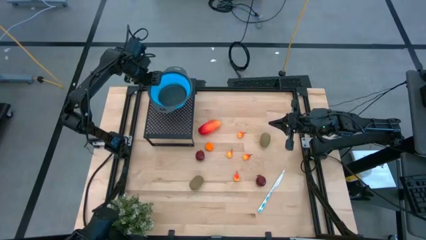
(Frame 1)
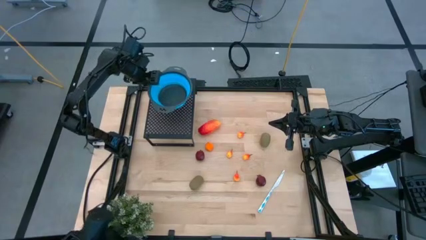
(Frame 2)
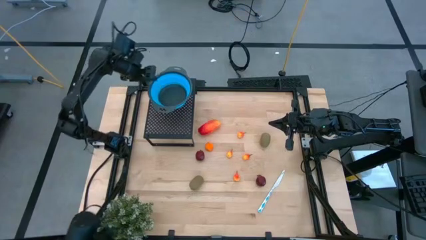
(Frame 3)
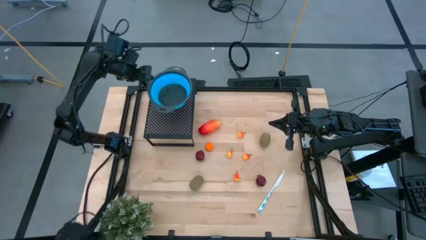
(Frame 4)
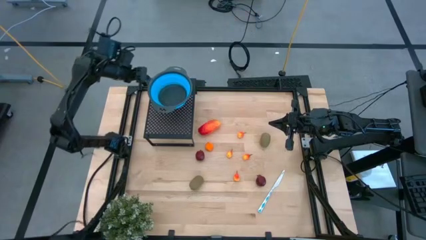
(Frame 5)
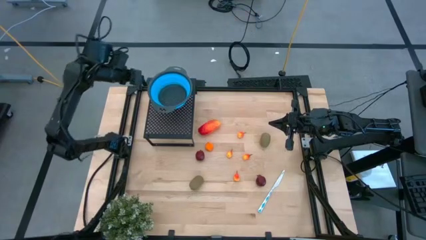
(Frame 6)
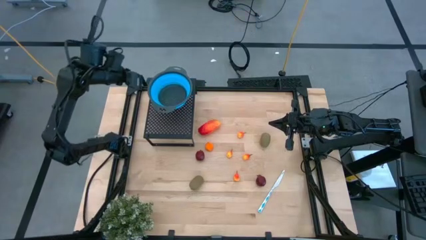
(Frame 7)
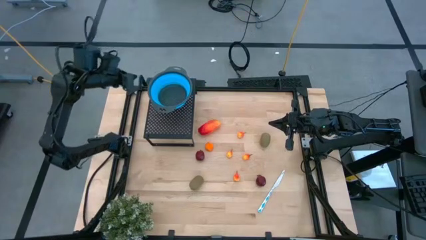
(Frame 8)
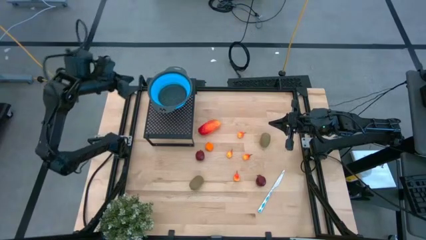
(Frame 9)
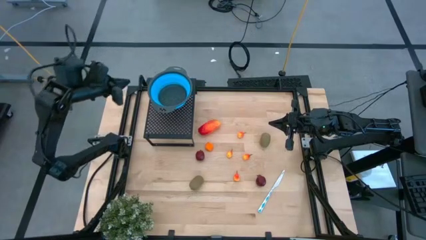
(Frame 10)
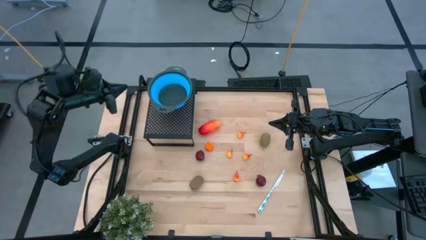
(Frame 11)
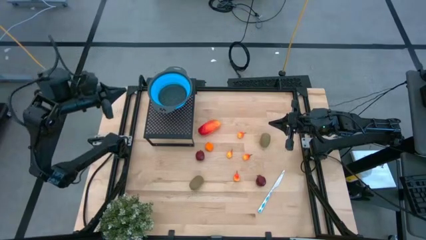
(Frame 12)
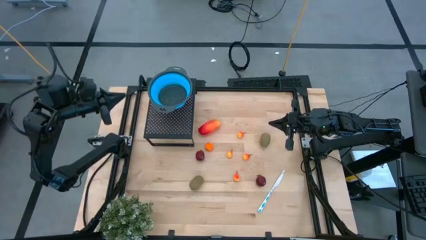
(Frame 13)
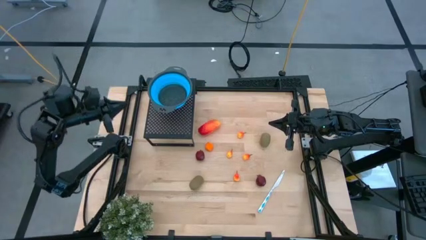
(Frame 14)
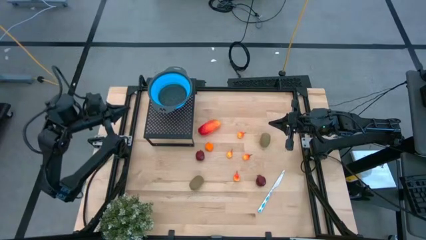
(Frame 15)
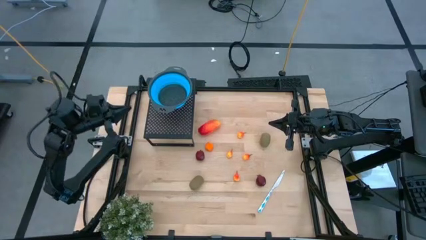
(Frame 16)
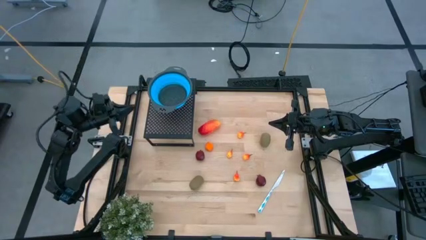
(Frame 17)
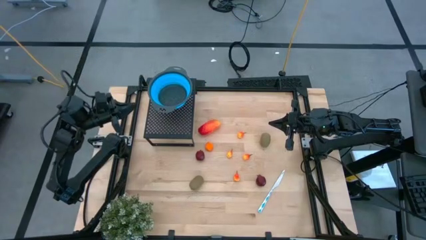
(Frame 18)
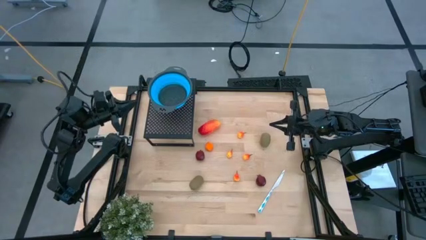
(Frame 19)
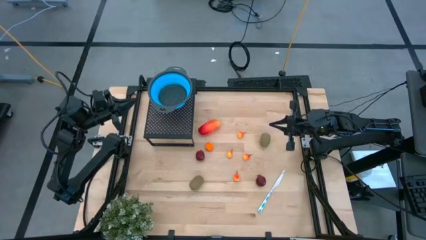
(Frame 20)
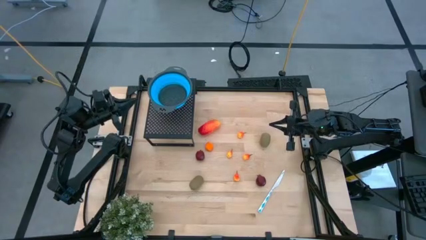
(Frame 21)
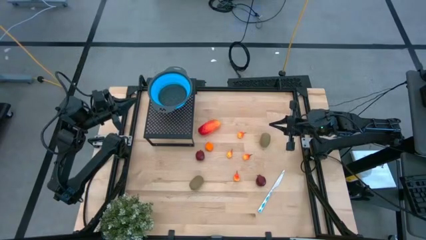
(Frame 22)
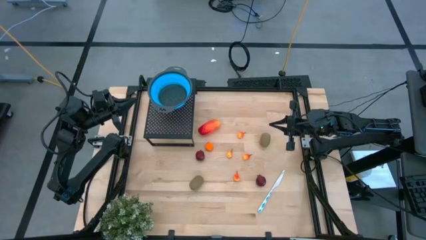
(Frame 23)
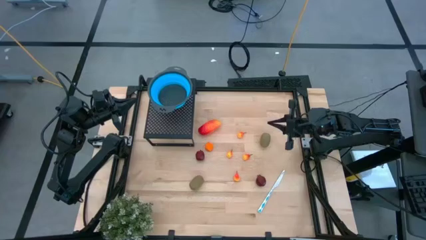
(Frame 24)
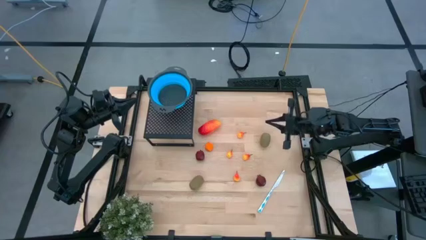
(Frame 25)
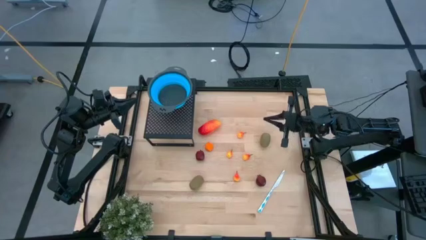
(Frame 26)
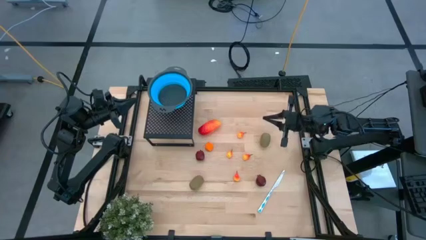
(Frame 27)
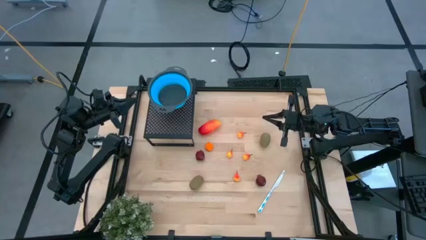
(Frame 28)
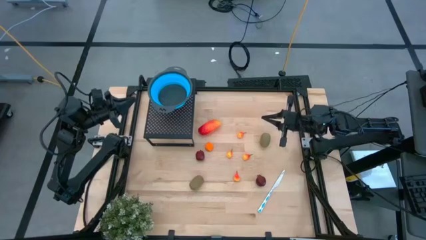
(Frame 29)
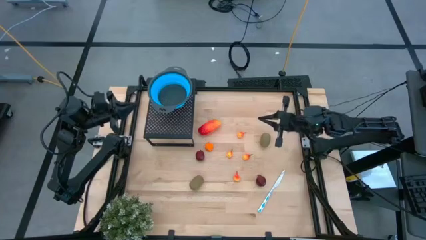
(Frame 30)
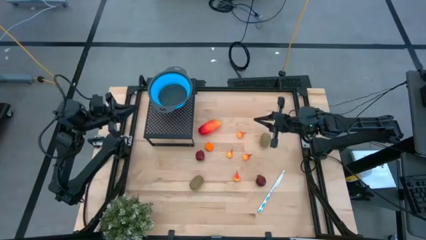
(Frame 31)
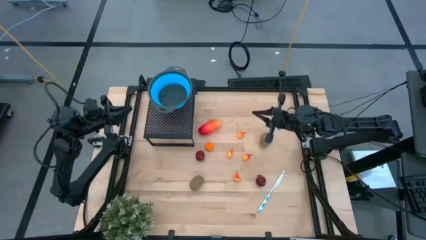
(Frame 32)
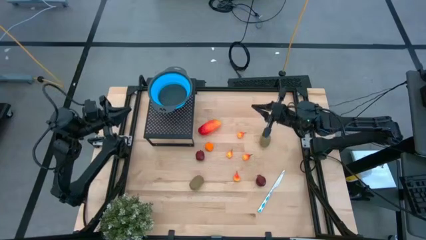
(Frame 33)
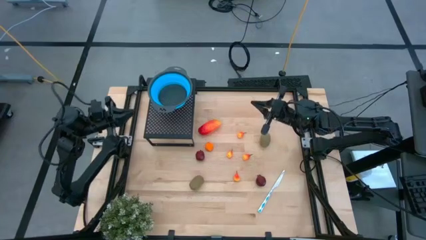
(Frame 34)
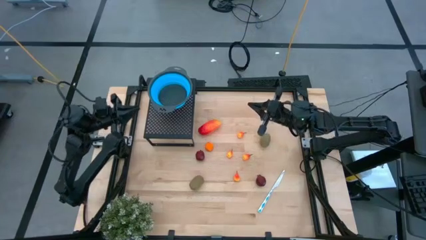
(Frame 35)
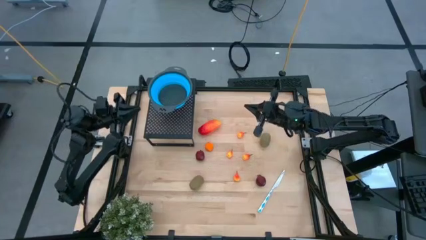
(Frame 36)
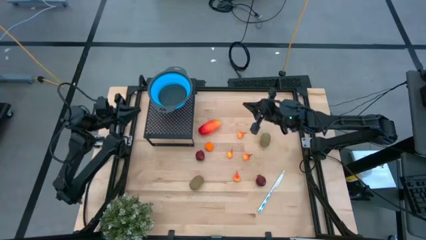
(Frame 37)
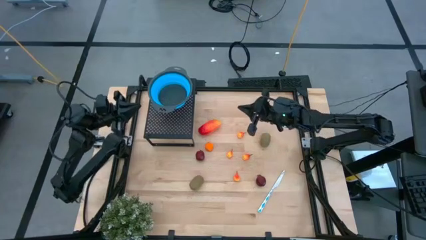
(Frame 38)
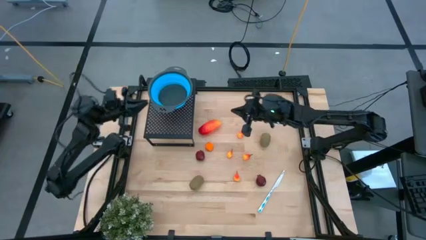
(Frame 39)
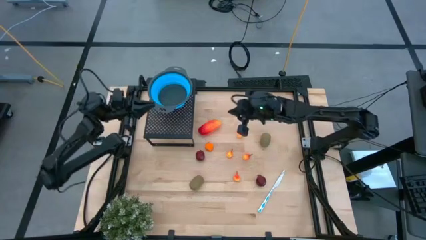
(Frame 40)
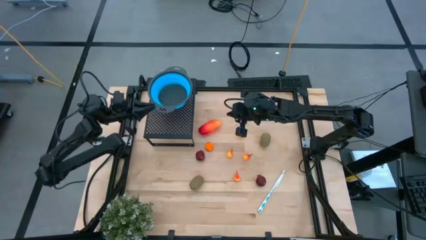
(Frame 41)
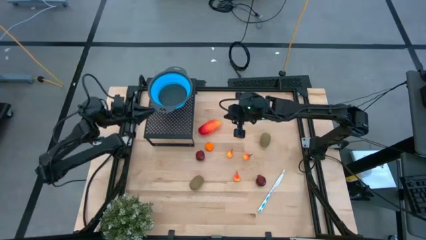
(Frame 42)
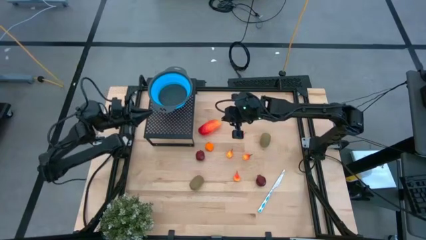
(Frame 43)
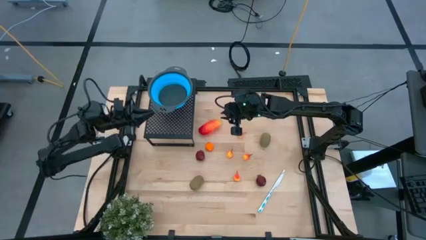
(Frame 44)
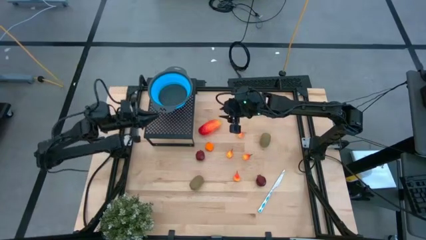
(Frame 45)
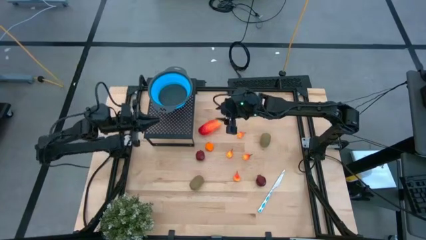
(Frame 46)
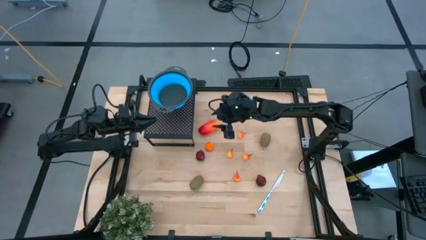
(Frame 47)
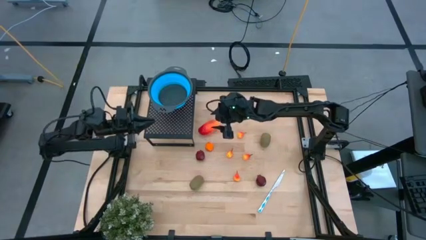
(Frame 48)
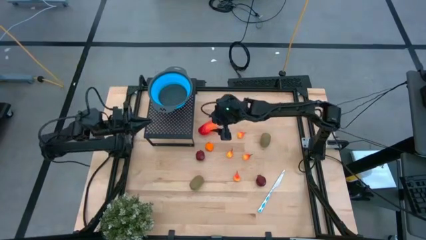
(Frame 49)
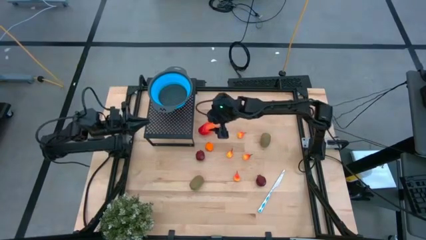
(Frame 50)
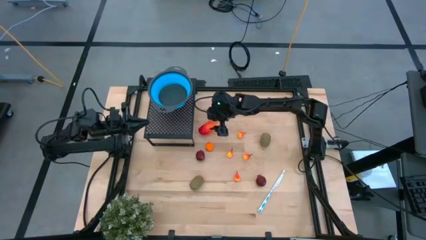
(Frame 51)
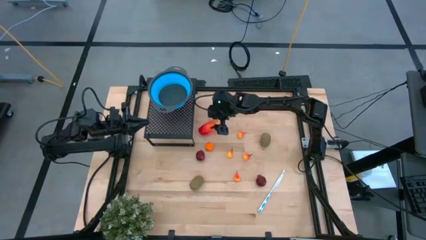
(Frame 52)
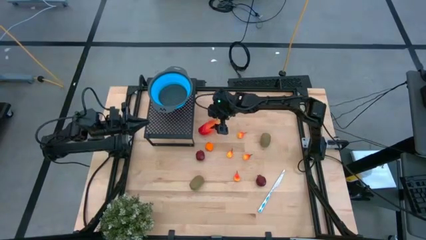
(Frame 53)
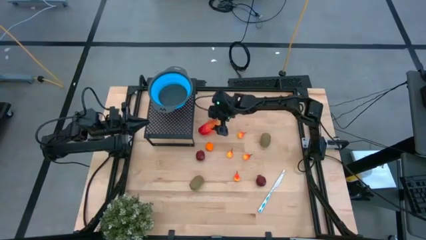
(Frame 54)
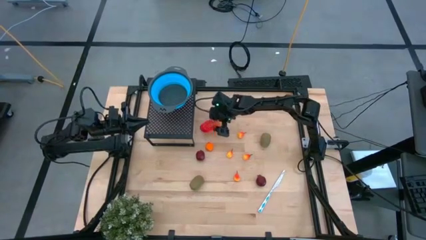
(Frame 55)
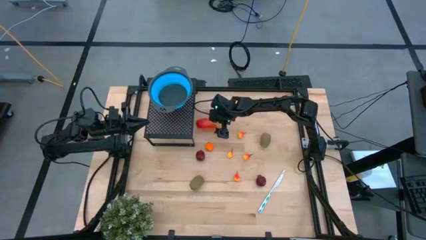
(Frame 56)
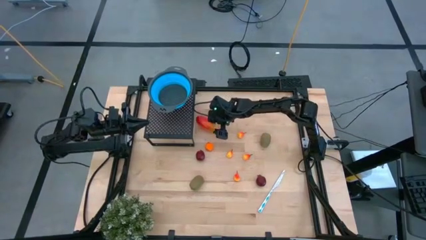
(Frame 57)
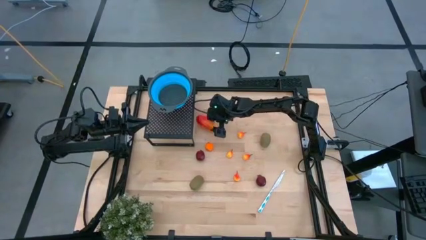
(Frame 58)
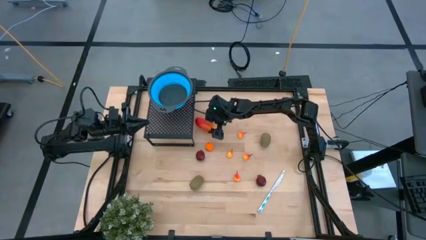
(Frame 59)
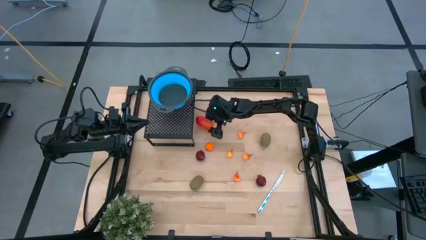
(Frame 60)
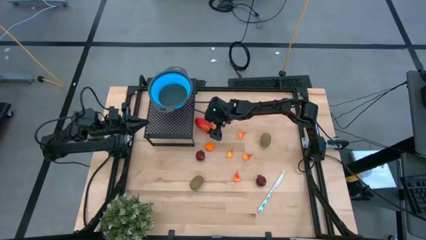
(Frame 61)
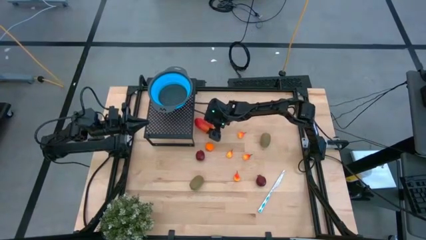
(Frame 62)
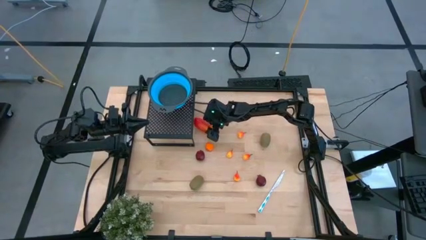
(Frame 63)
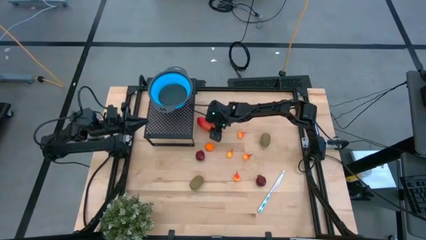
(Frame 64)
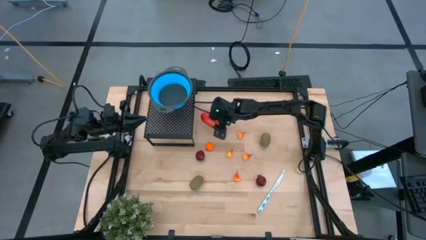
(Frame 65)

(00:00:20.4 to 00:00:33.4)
Task: Pick & Place Fruit
Put the mango into the blue strainer bowl on the shelf

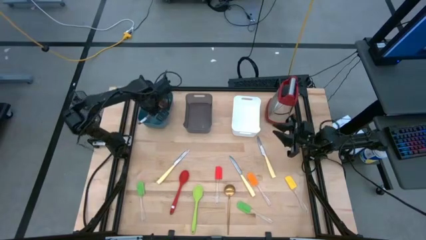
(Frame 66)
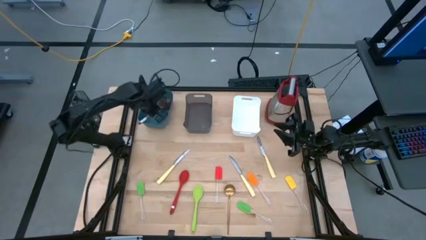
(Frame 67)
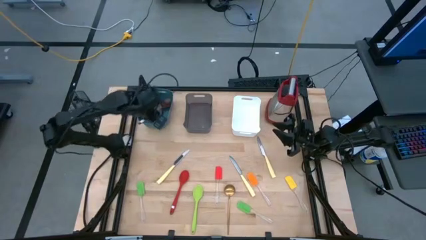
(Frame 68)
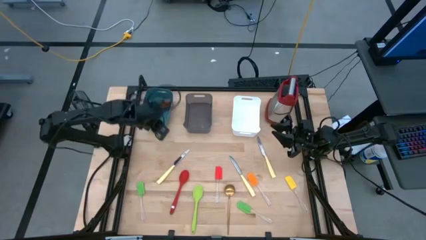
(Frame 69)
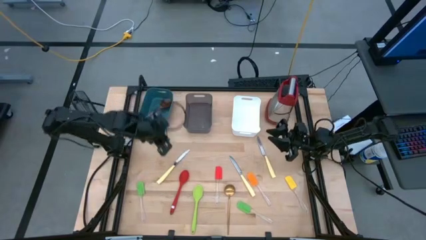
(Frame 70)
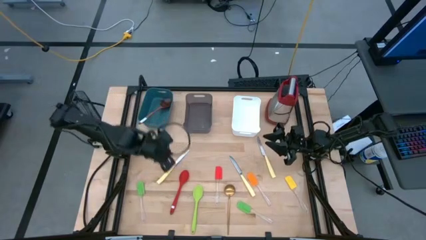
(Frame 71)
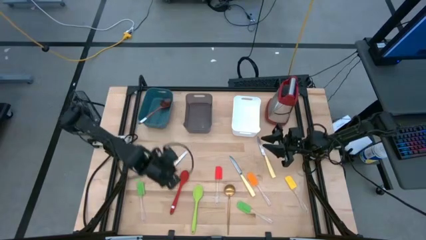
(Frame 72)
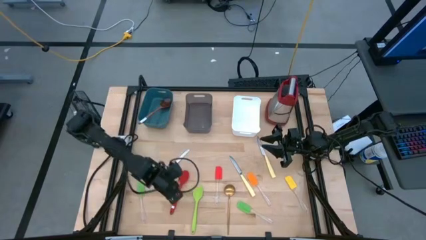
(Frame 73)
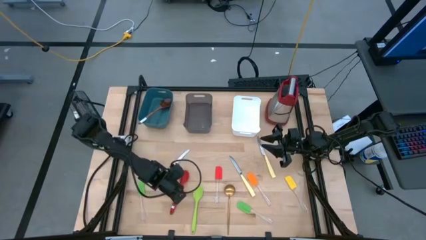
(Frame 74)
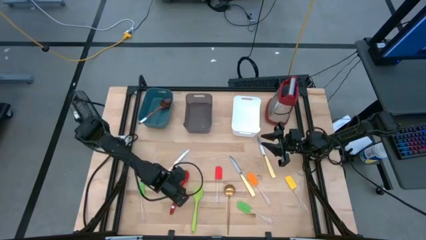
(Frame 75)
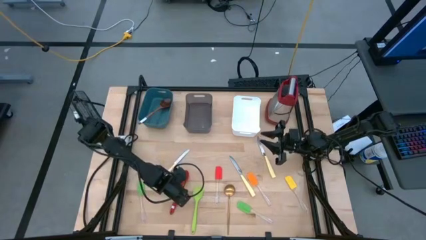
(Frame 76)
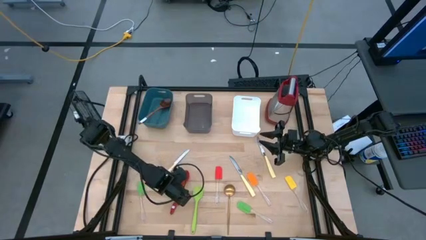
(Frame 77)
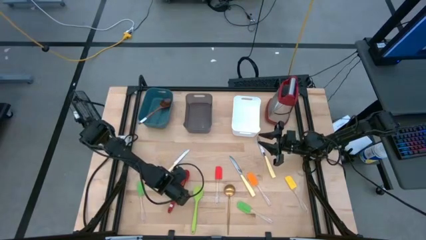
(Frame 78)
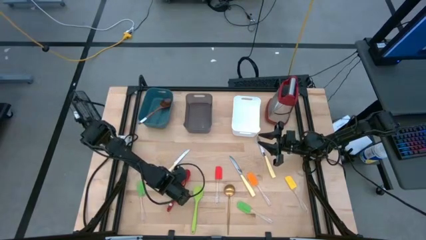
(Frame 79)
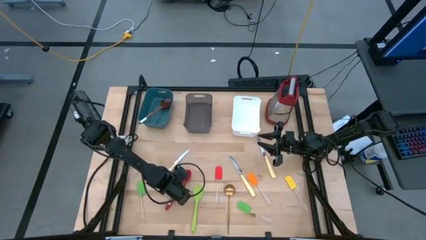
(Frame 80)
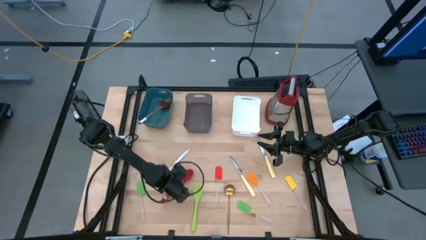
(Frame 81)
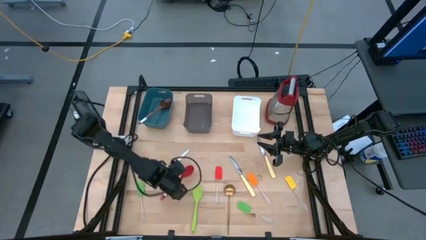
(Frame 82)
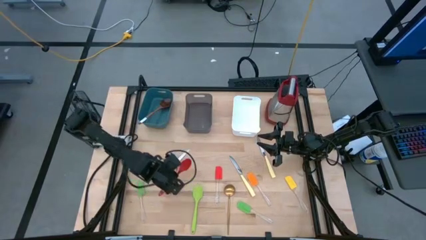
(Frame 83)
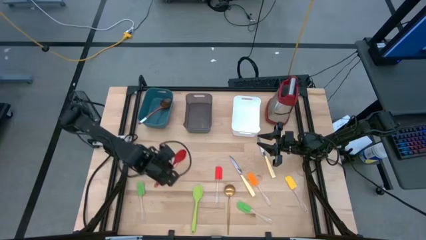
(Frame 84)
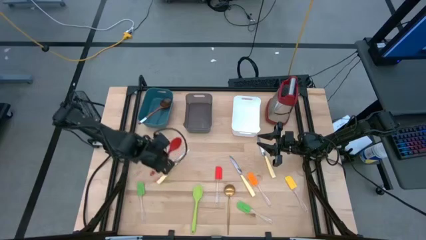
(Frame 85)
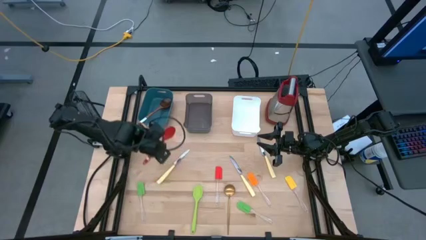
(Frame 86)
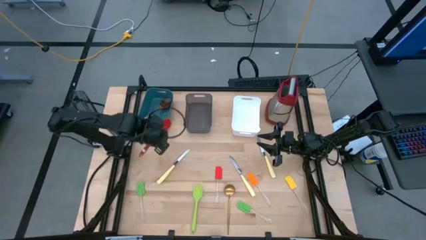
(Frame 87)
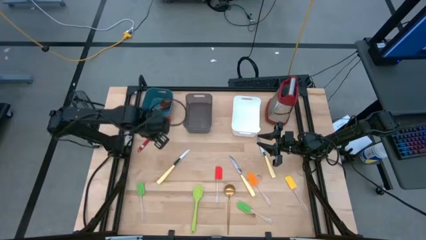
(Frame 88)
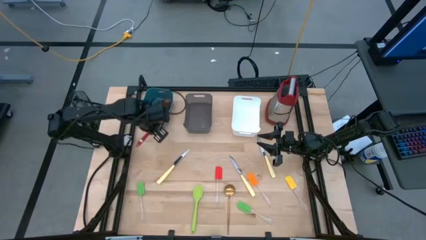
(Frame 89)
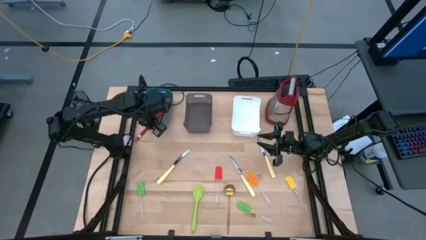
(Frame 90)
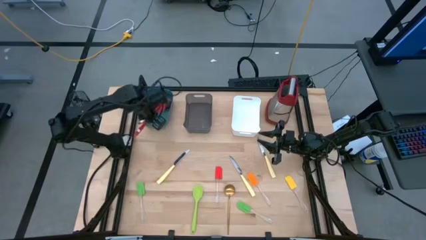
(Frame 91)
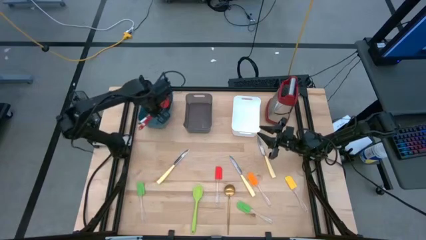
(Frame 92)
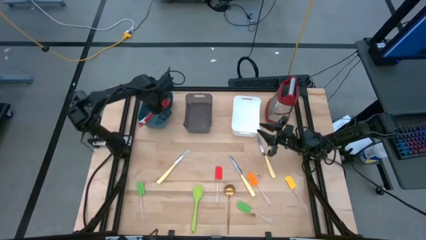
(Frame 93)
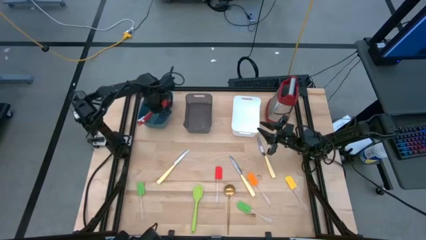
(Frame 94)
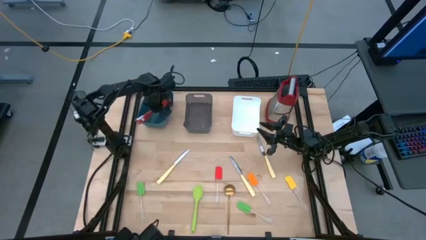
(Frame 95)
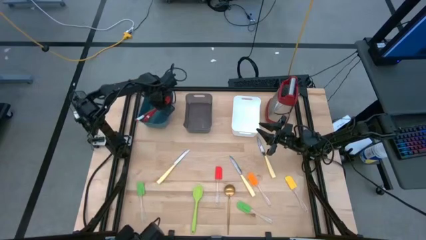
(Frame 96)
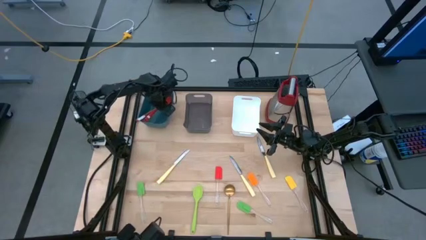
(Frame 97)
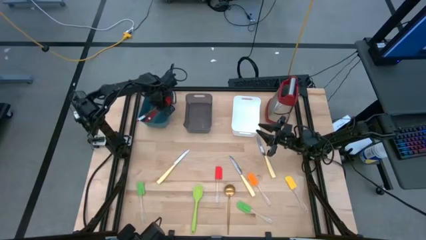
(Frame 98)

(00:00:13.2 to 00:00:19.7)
Task: Pick & Place Kitchen Items
Put the red serving spoon into the blue bin
